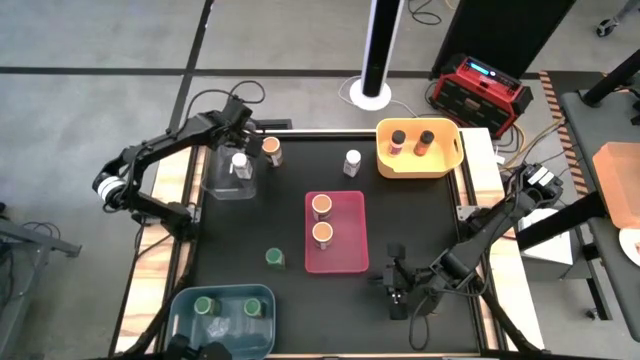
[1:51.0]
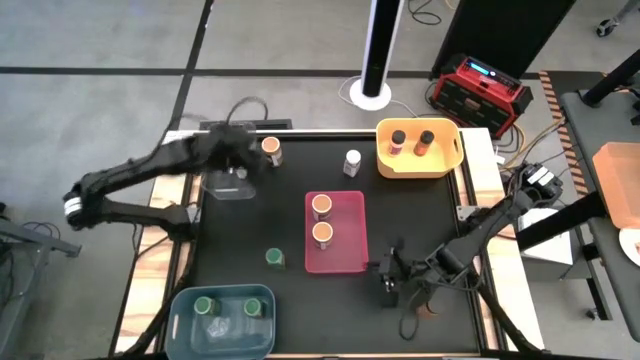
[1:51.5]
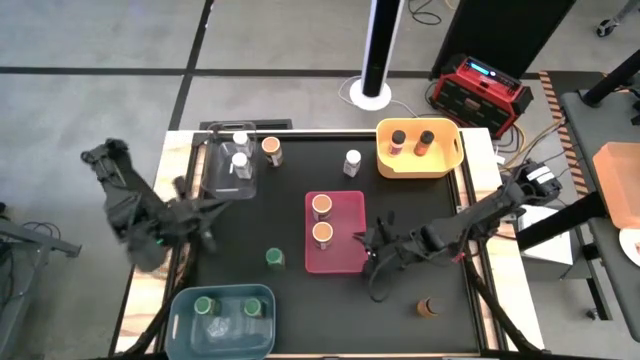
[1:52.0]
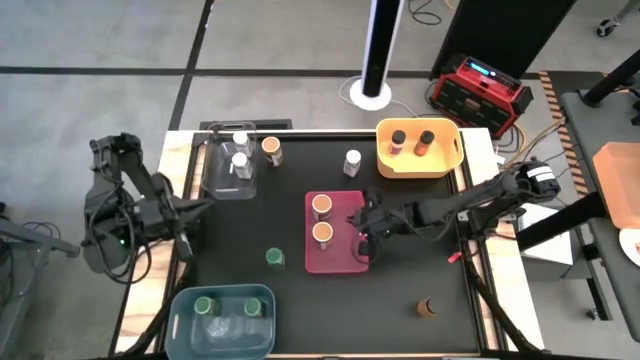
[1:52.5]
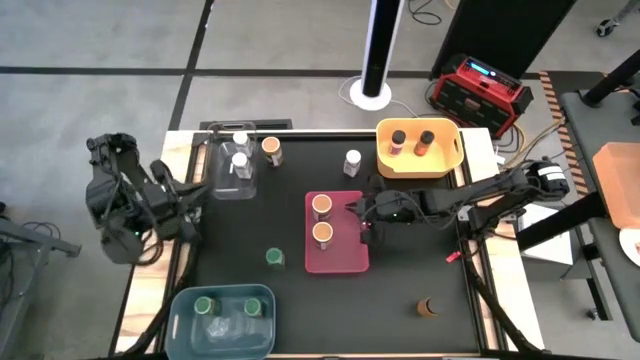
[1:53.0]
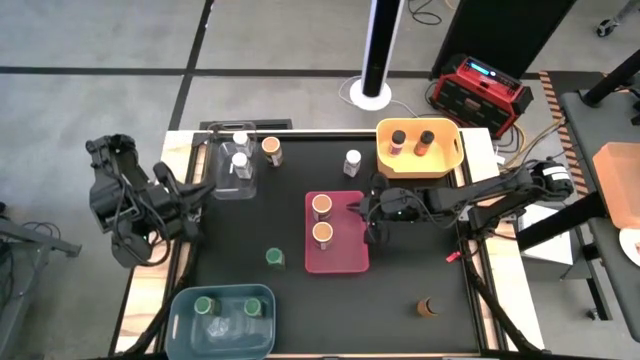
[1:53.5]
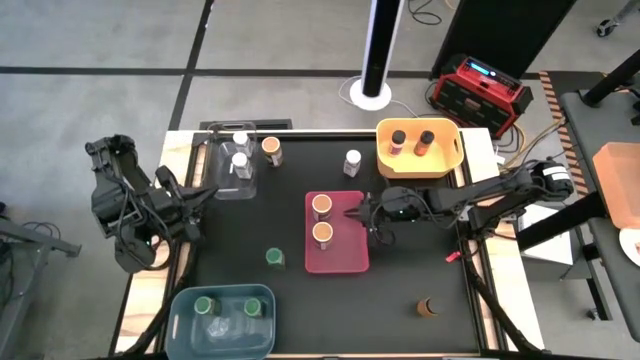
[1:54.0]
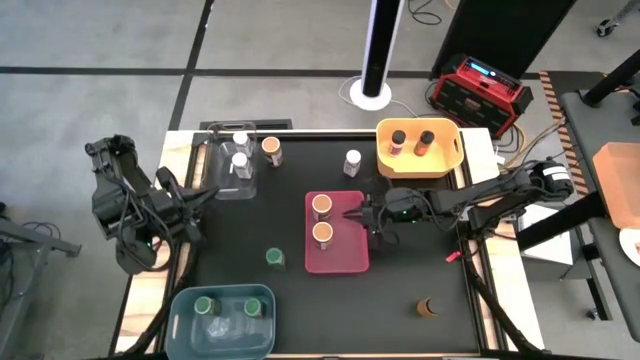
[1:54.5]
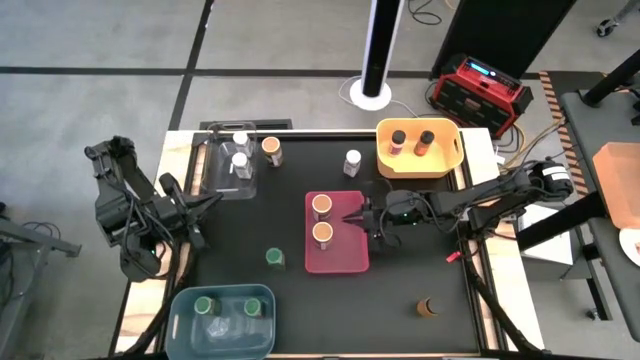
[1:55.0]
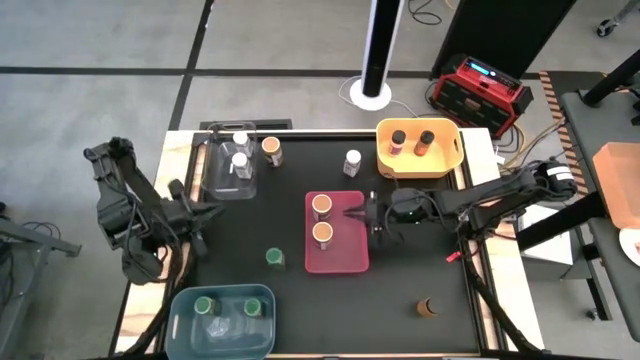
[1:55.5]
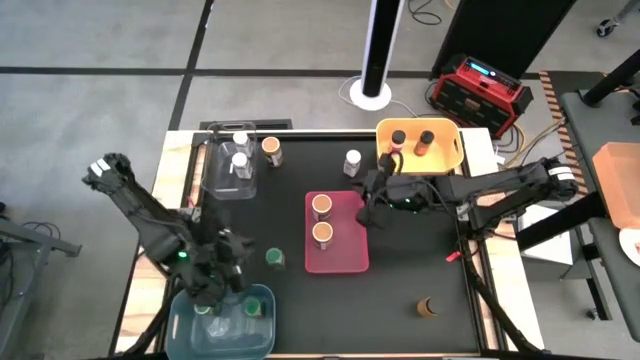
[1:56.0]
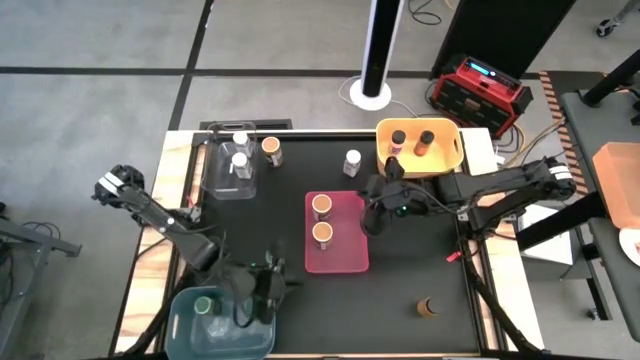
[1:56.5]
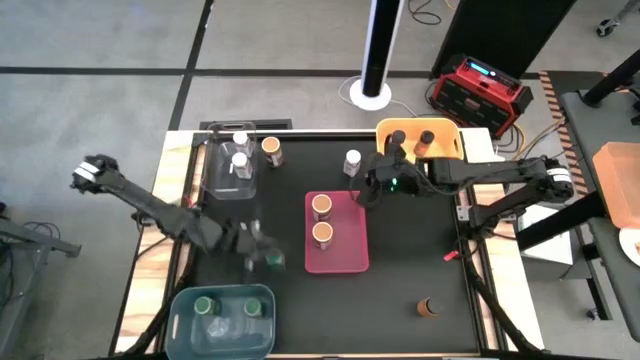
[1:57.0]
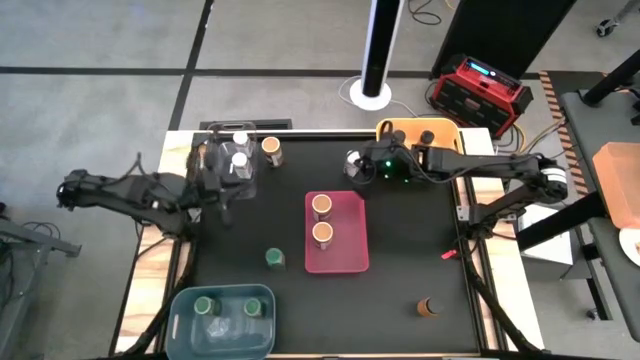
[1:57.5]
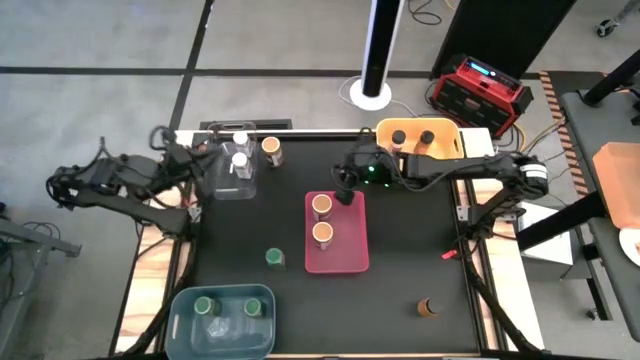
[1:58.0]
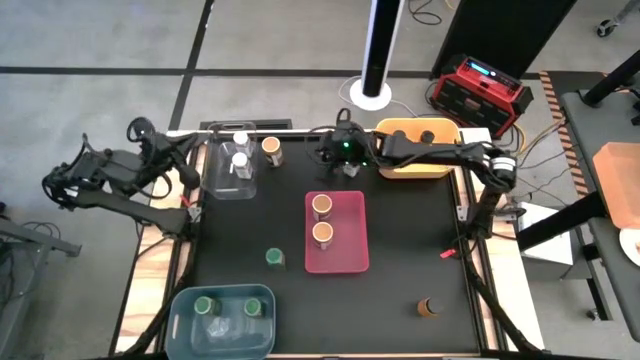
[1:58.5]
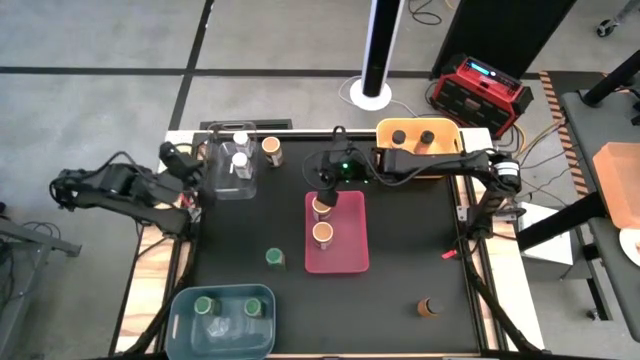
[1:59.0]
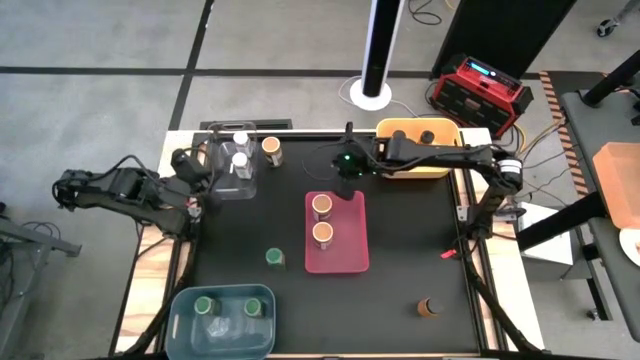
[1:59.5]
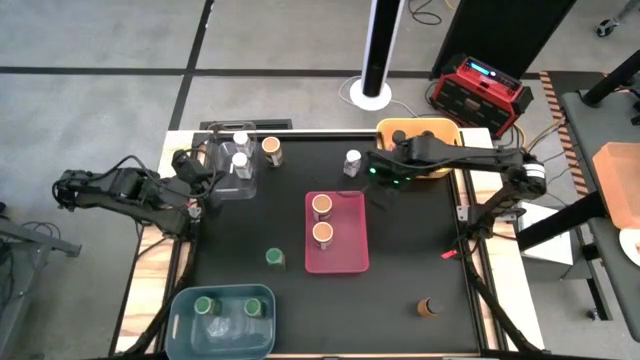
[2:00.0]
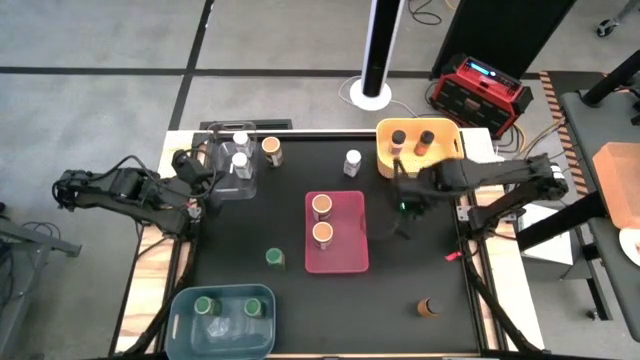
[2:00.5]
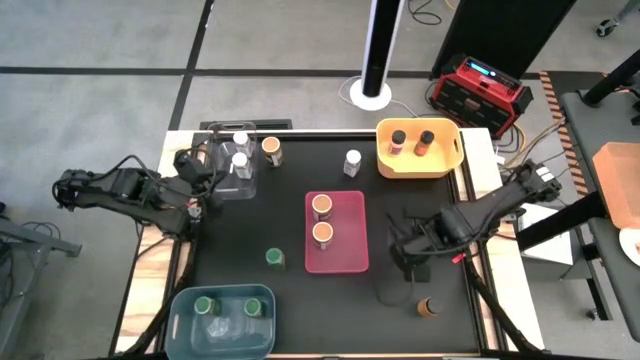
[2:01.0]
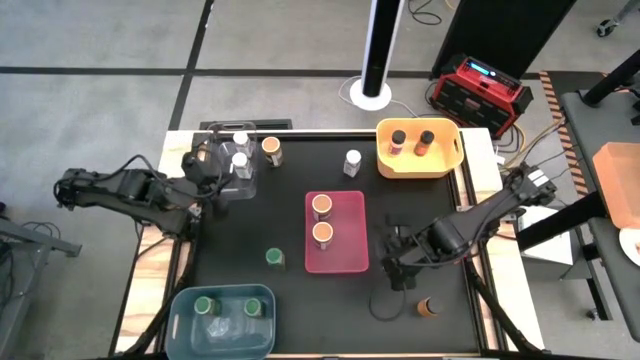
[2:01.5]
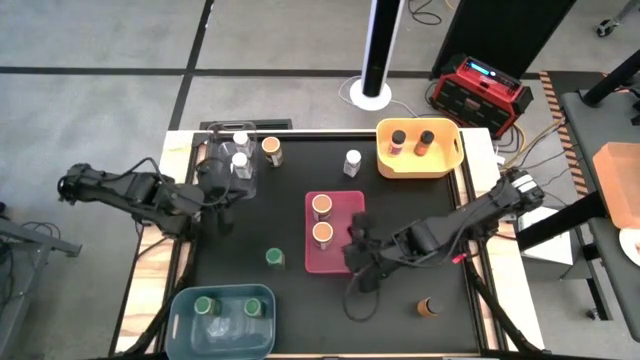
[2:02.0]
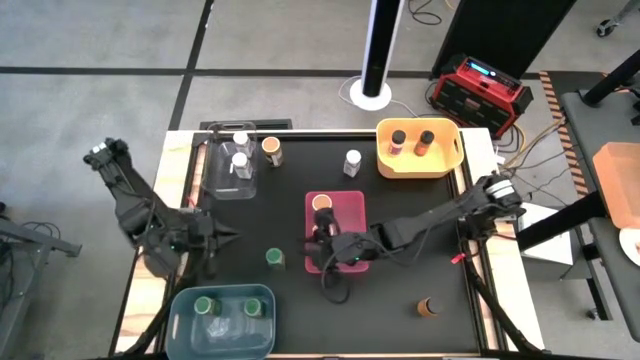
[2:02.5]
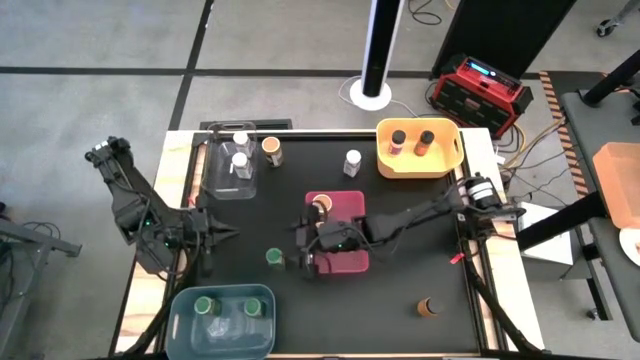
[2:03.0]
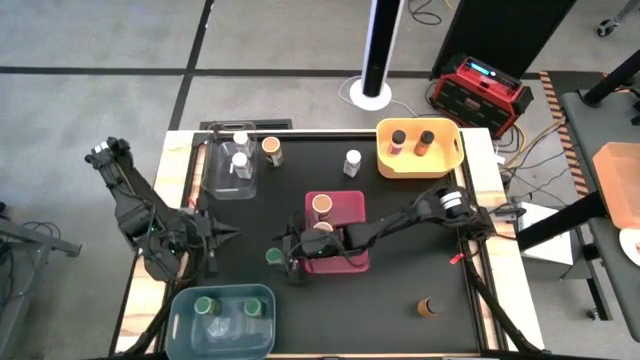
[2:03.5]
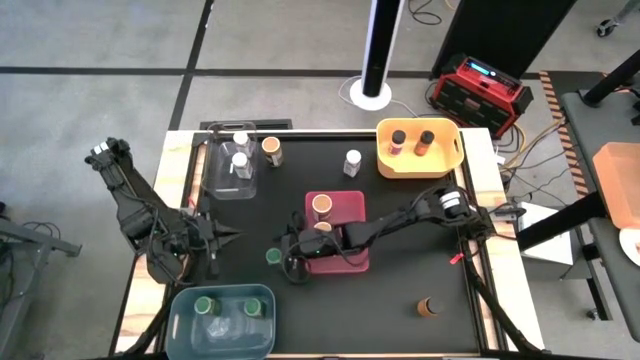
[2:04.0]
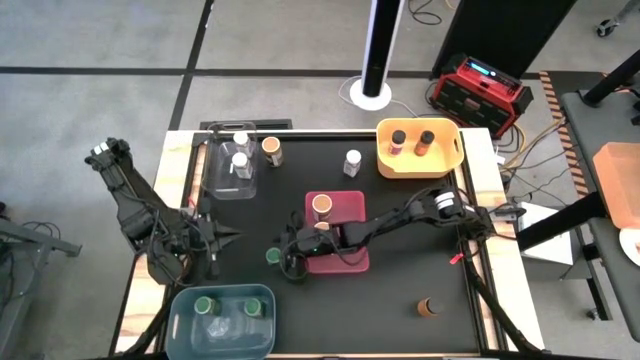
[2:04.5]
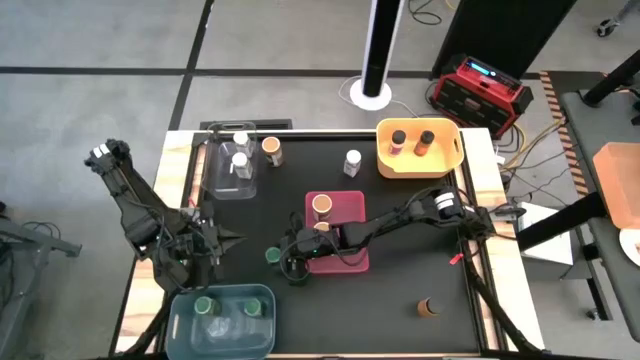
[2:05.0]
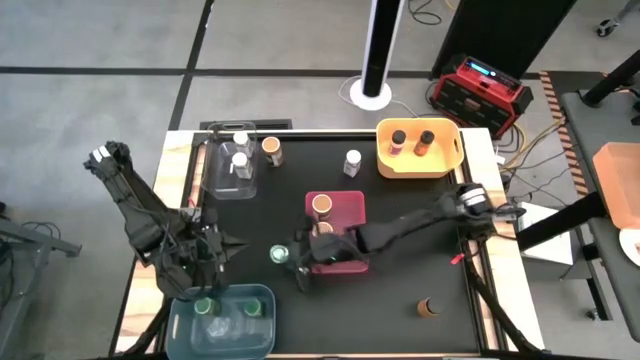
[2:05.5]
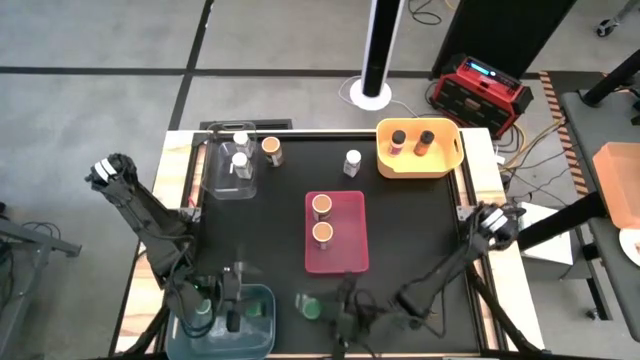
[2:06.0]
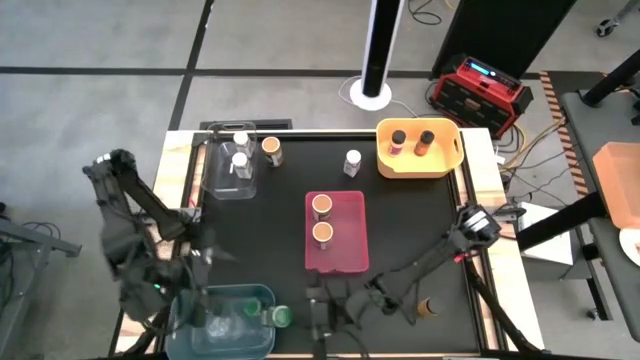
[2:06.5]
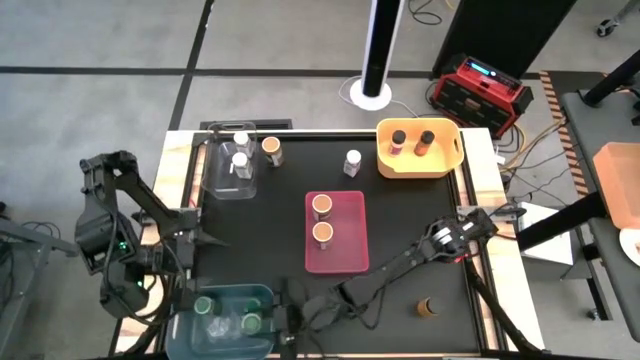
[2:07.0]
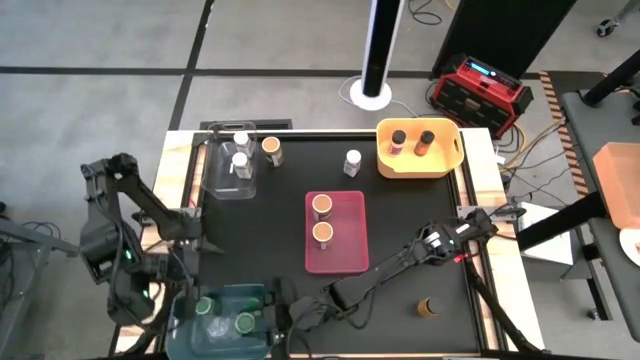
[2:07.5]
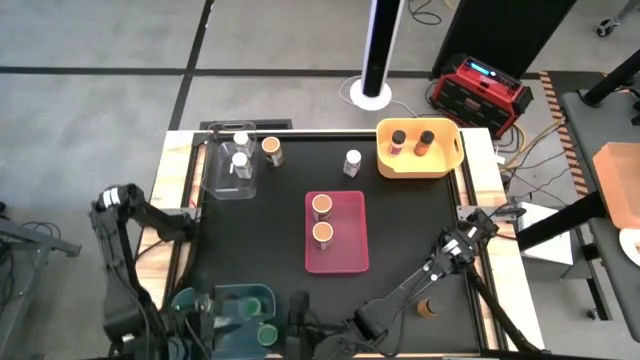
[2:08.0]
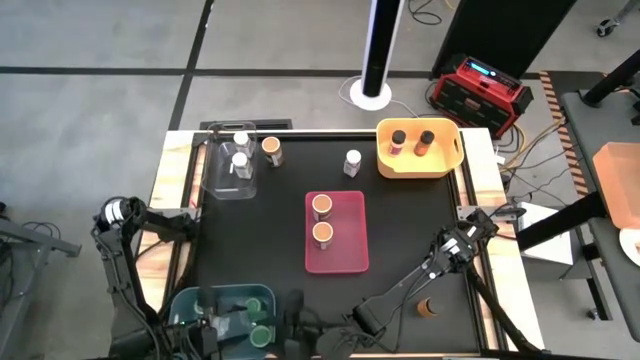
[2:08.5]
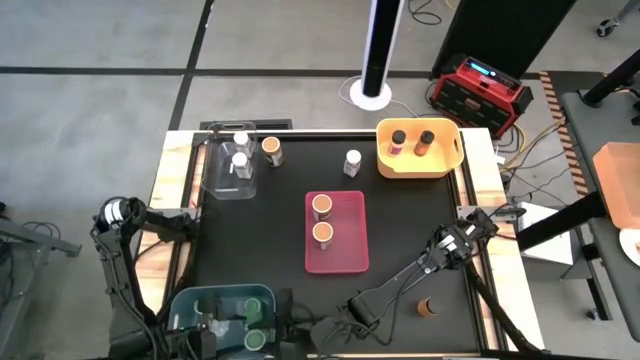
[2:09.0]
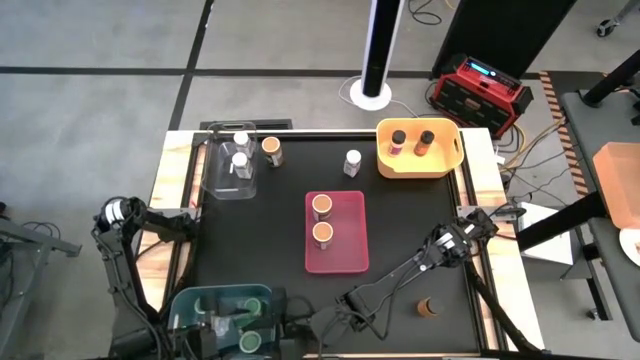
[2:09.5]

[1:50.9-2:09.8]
Task: Sort spices by type
Put the green seasoning bottle into the blue bin

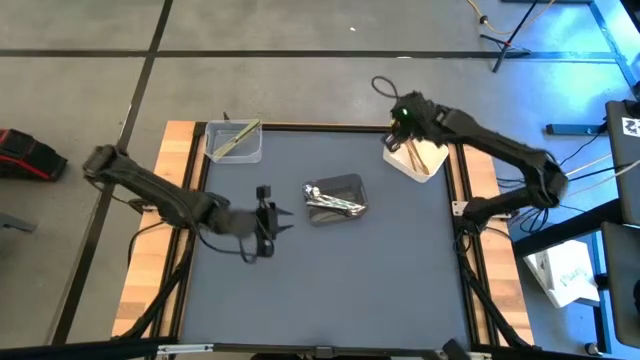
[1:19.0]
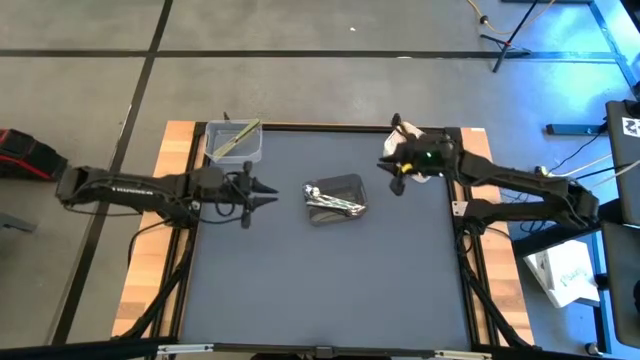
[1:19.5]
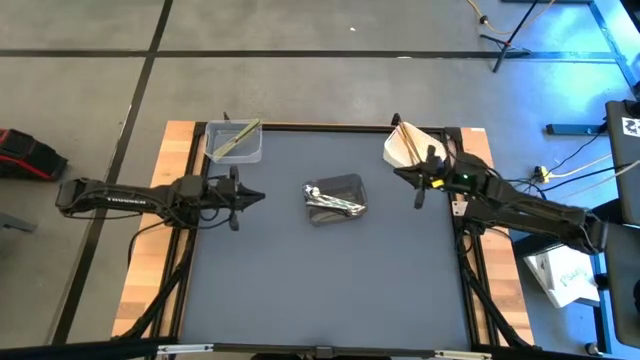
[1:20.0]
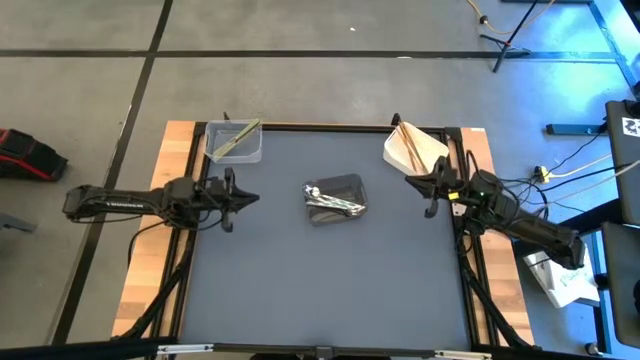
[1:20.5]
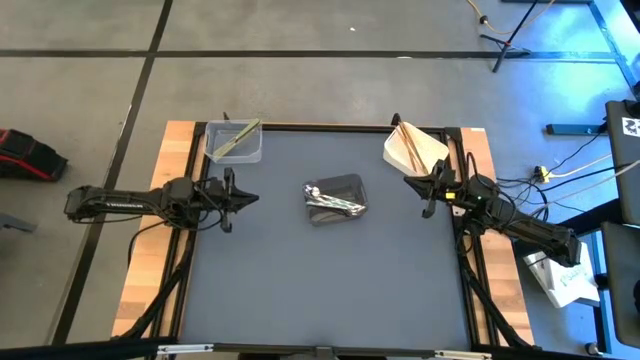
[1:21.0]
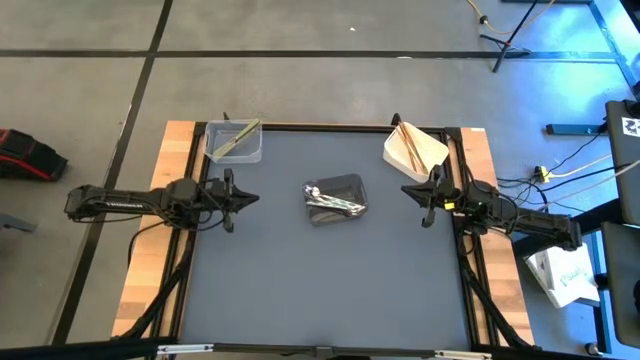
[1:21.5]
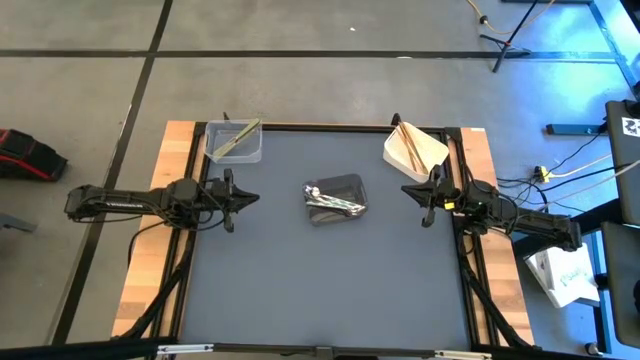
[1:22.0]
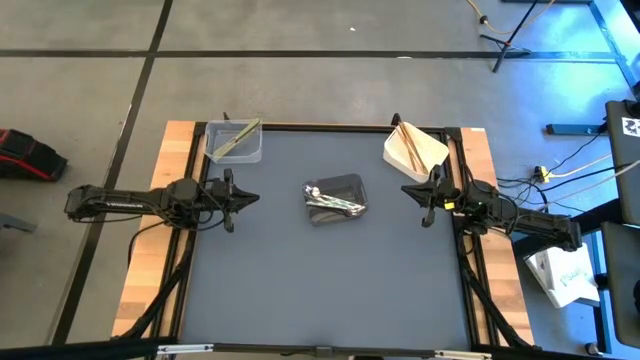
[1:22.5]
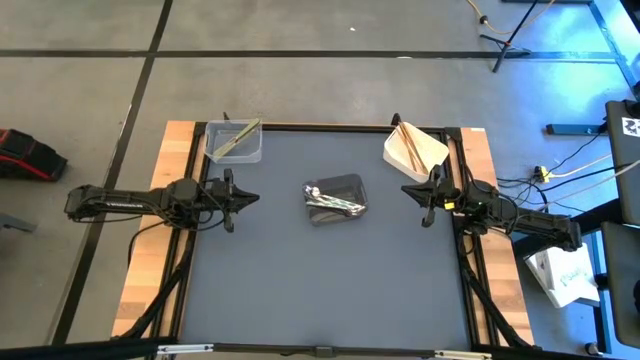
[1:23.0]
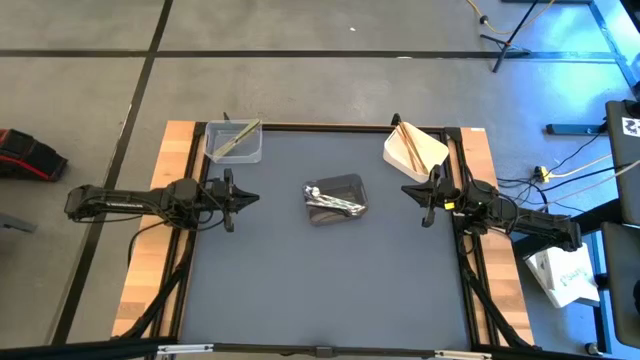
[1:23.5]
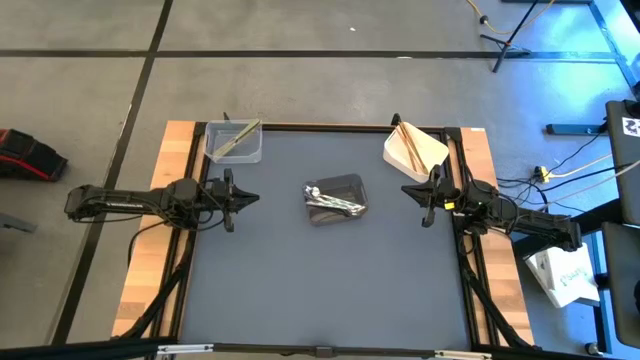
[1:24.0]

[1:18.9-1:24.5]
Task: Sort silverware by color (type)
Return to Home Position
